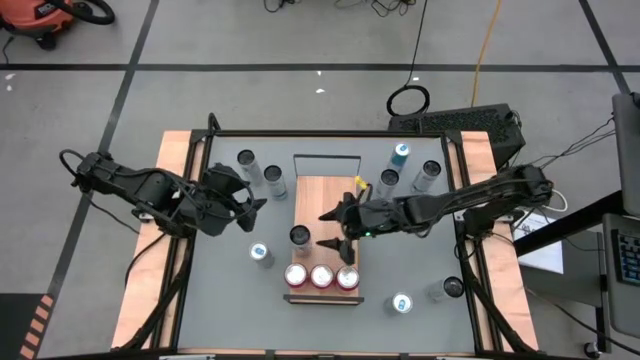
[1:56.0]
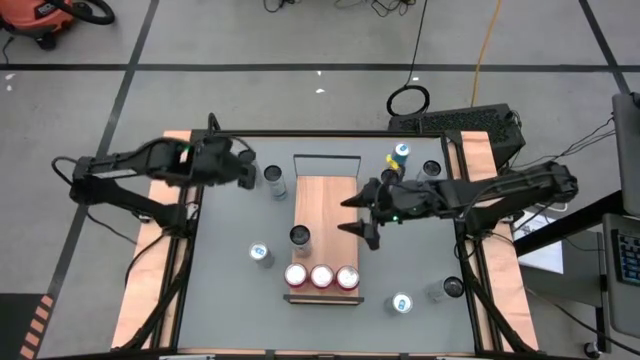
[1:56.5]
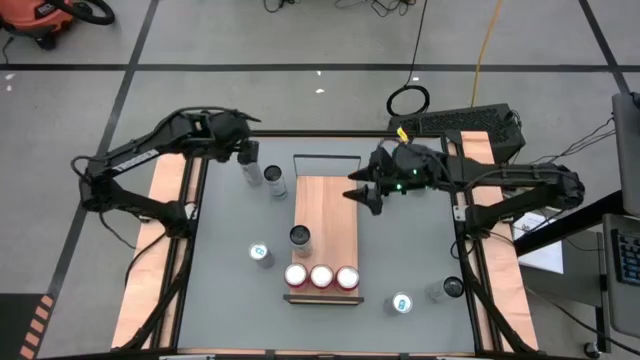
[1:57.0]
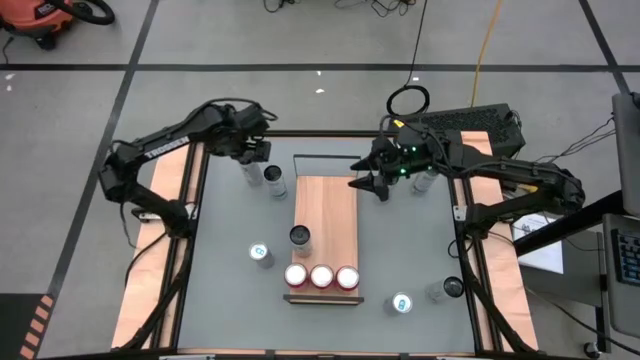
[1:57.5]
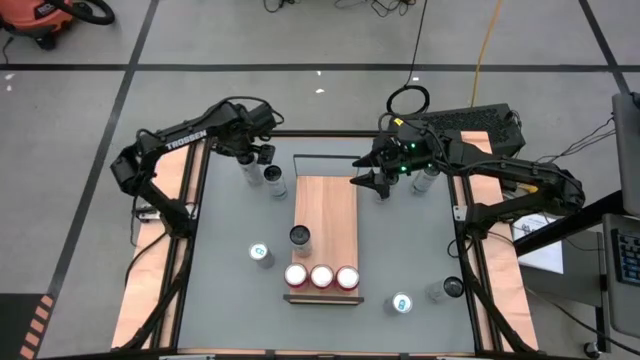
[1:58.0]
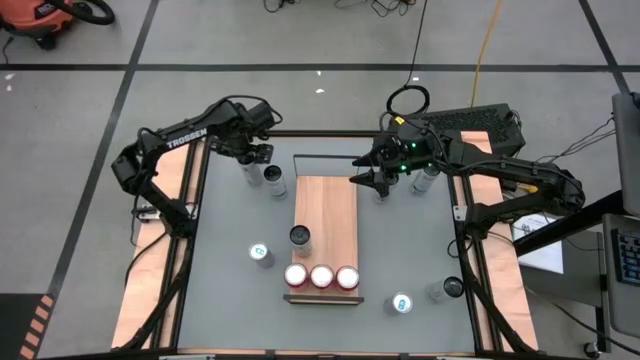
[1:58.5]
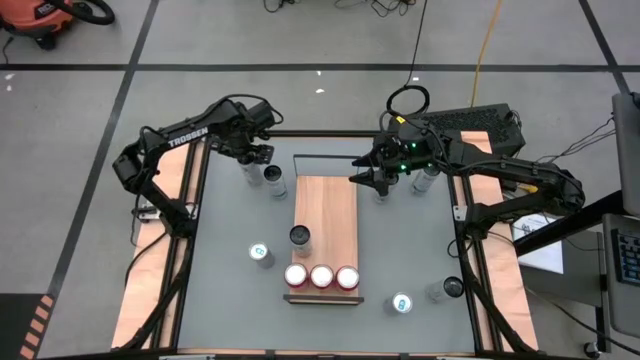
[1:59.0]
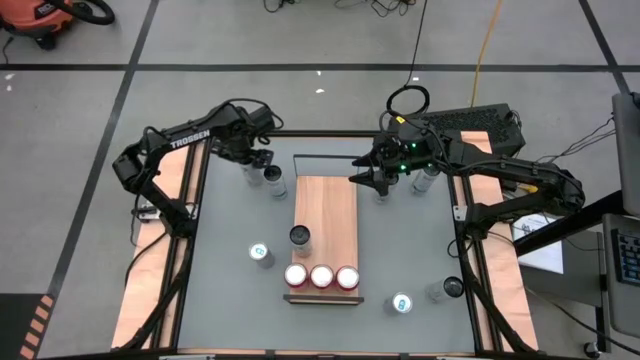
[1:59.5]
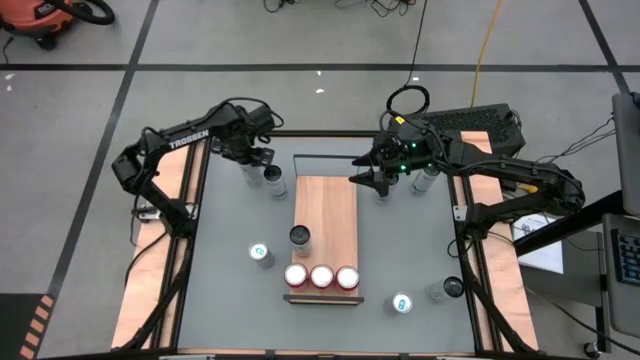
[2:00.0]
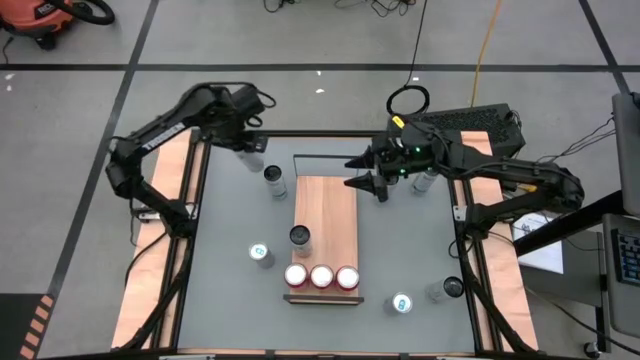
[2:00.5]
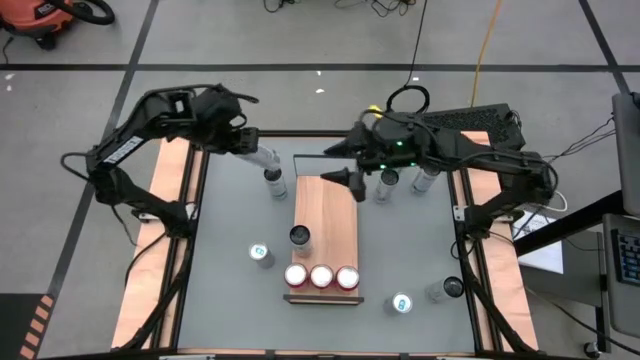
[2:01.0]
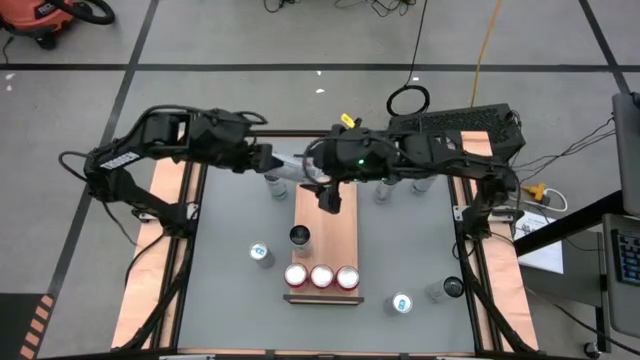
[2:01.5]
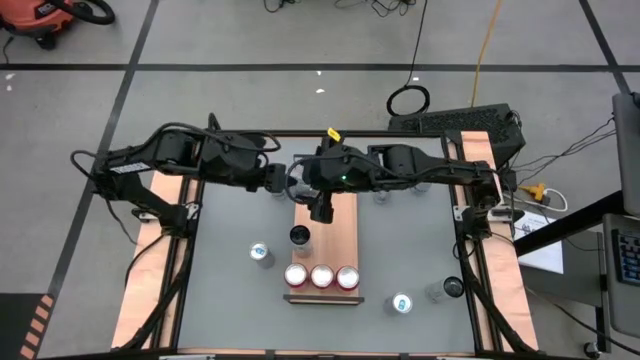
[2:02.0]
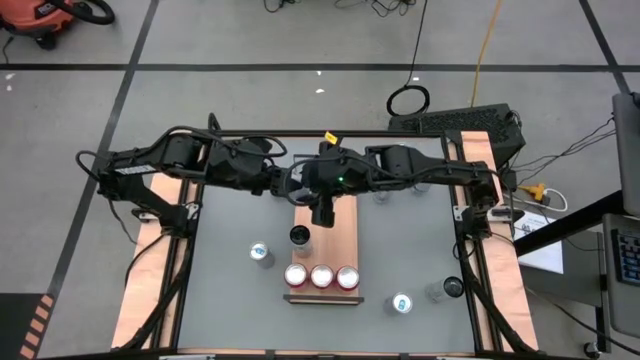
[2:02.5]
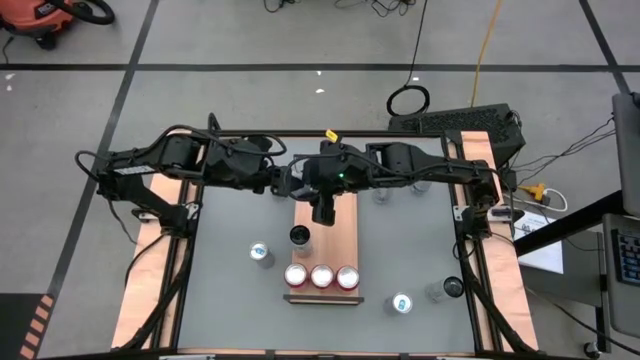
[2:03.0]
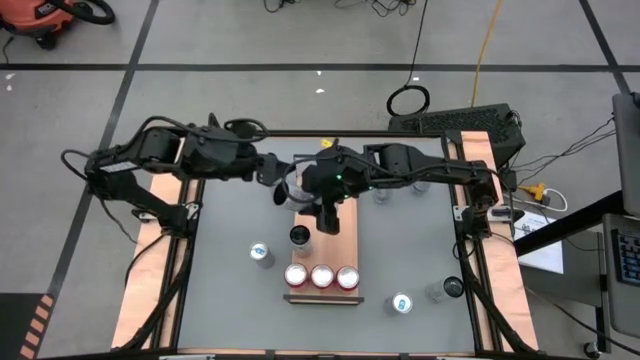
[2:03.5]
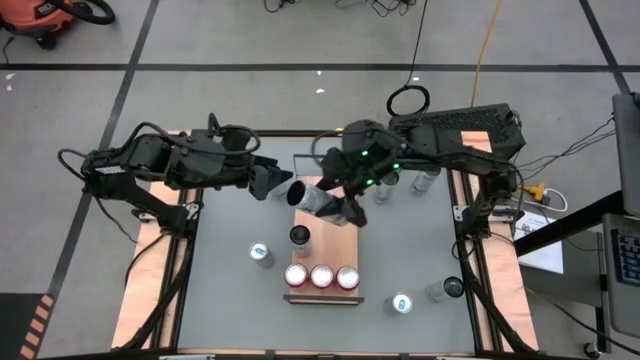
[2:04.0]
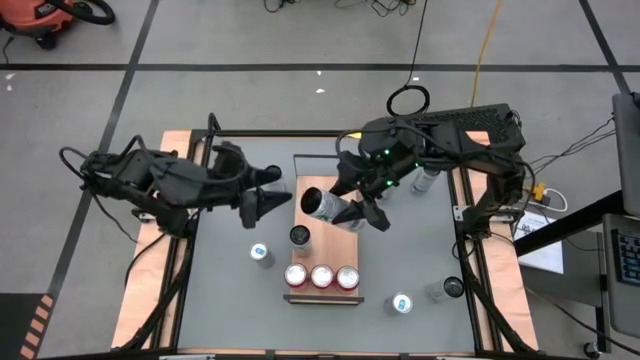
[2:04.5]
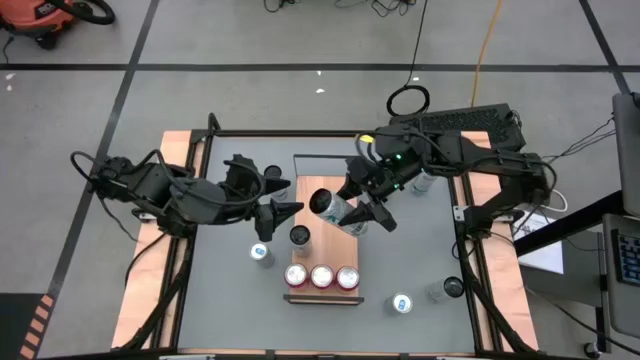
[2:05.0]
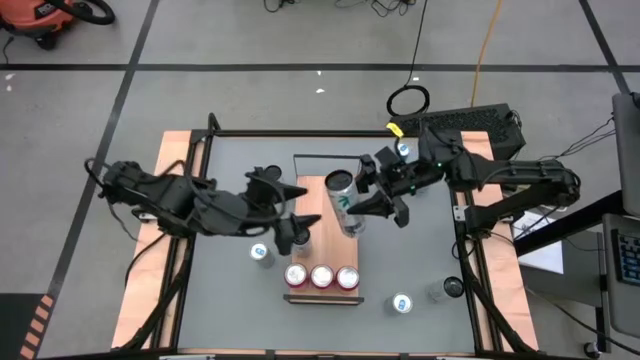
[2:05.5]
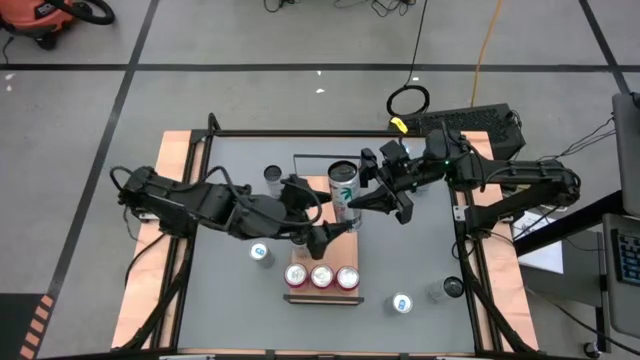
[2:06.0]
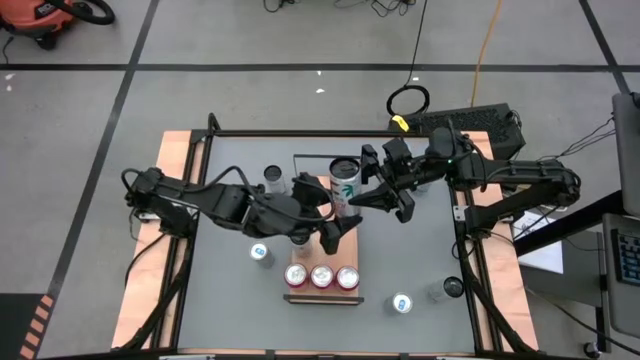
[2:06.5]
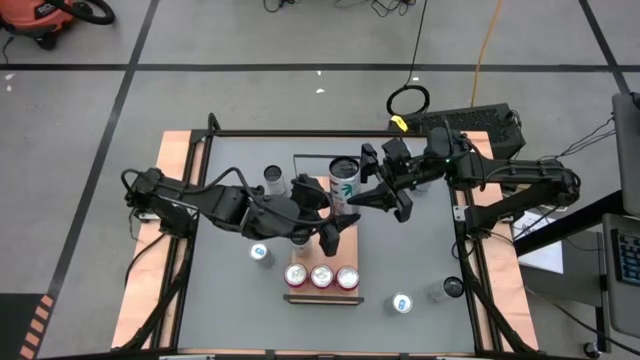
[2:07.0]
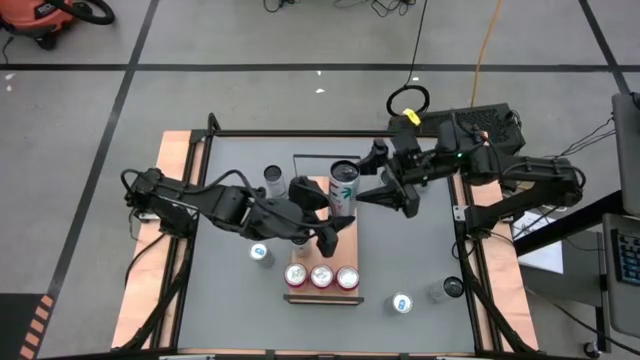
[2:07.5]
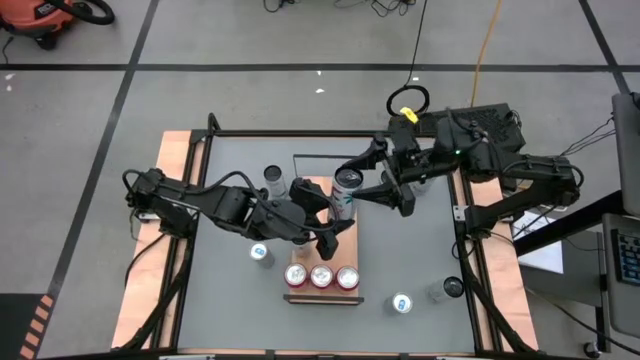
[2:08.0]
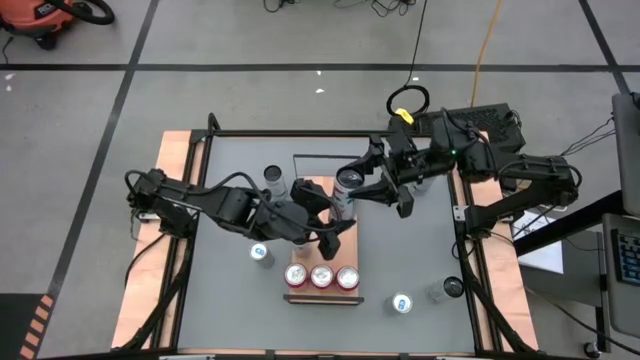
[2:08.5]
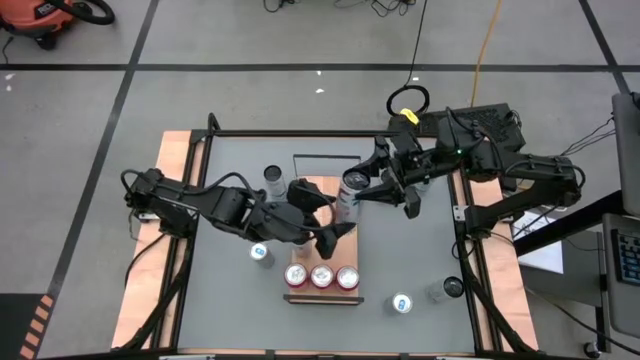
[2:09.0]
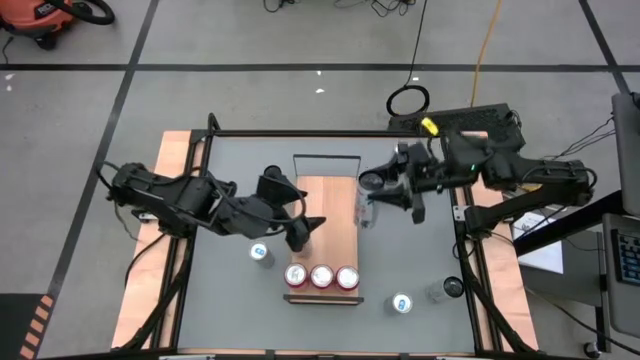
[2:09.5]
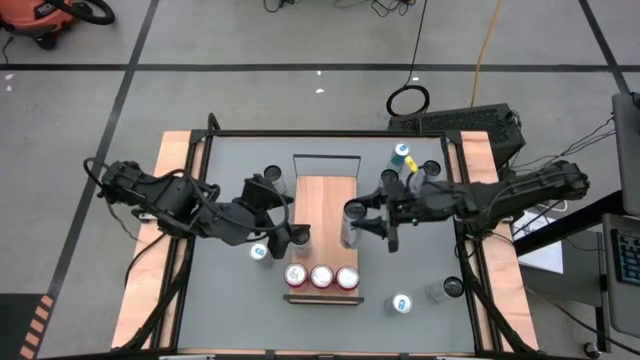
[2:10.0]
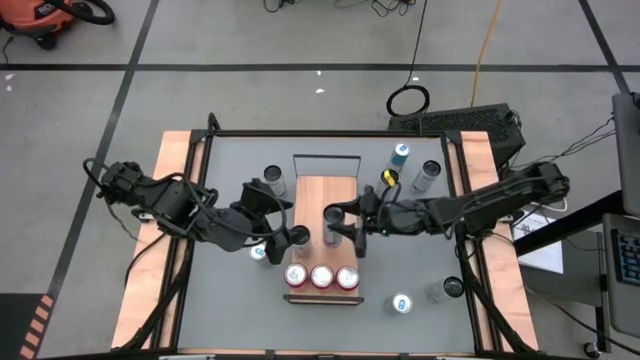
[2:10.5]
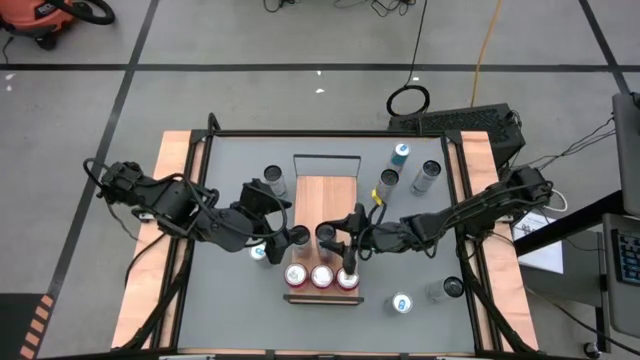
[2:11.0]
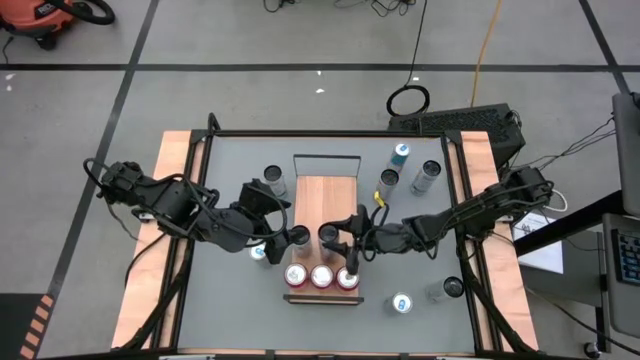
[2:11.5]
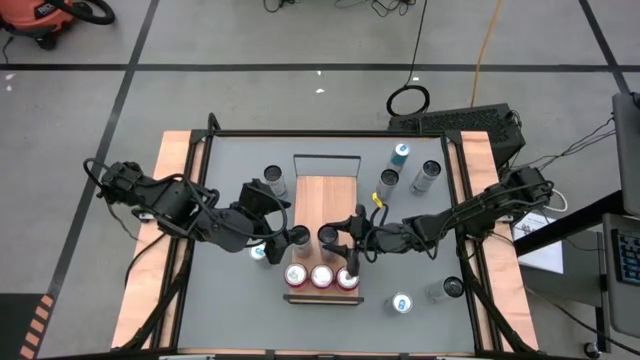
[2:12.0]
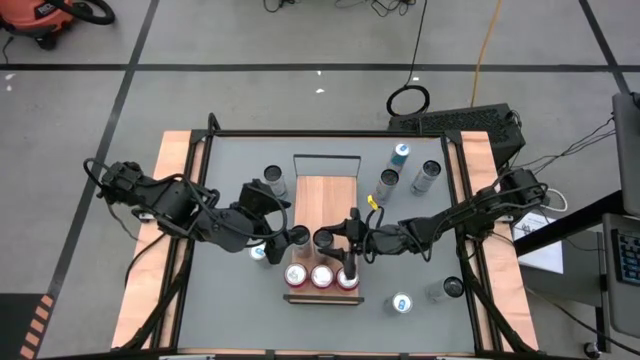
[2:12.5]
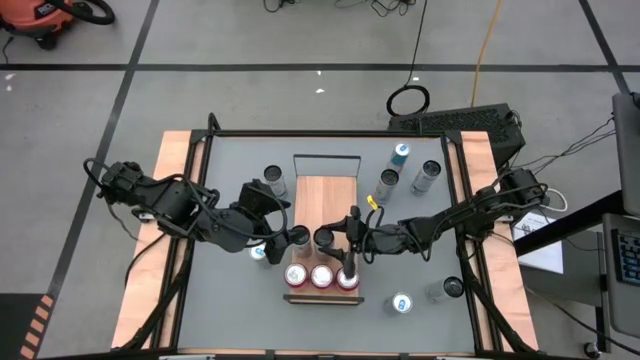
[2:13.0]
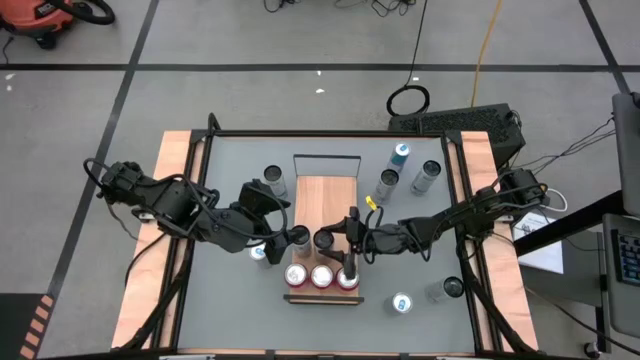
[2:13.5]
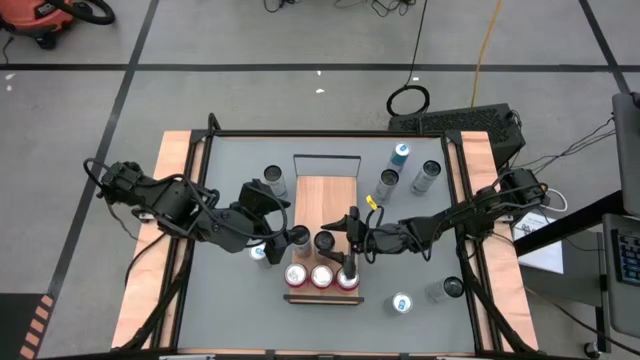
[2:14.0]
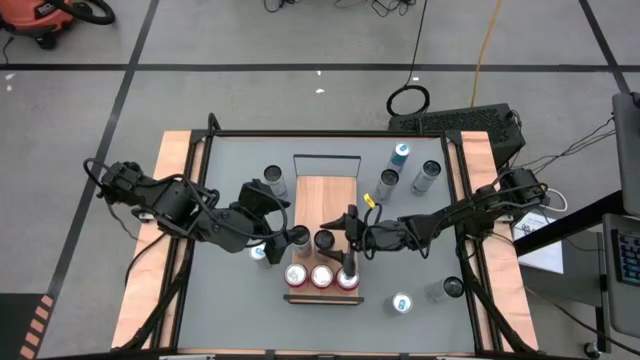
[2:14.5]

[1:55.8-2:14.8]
Task: Sort soda cans
Put the top white pink soda can on the shelf and align it with the other white pink soda can
